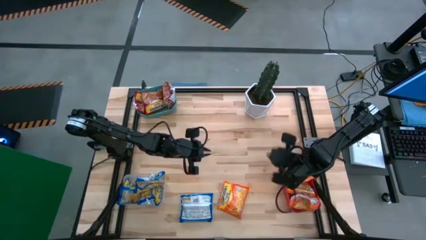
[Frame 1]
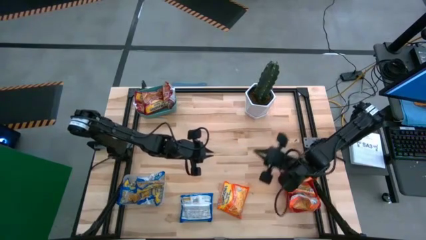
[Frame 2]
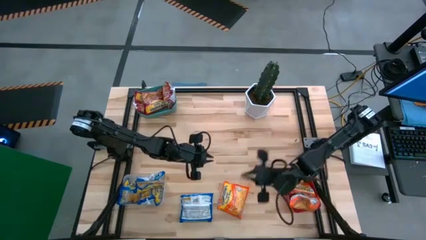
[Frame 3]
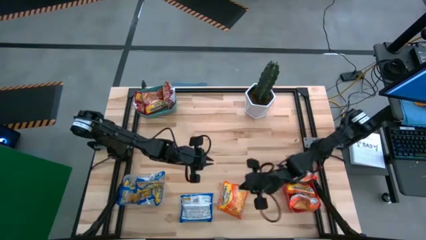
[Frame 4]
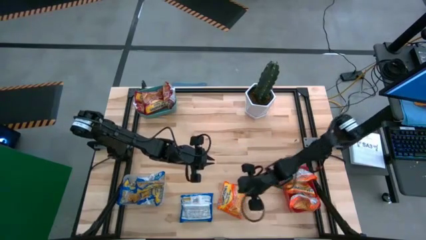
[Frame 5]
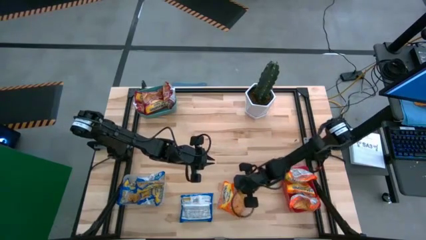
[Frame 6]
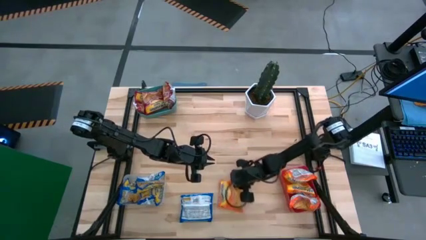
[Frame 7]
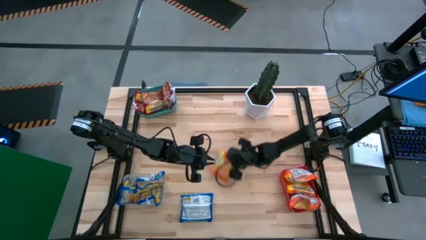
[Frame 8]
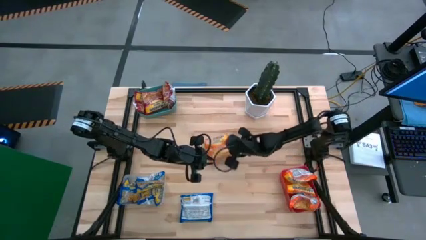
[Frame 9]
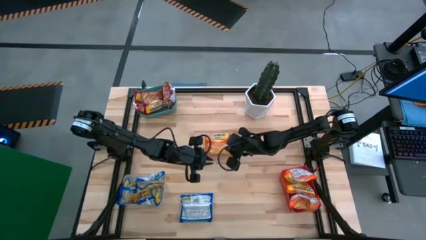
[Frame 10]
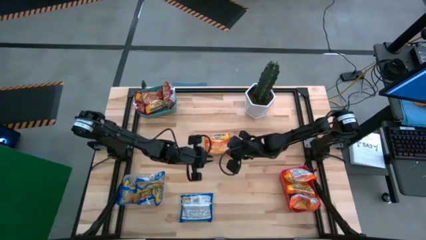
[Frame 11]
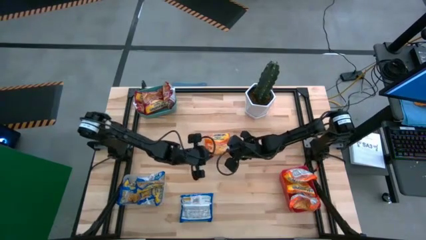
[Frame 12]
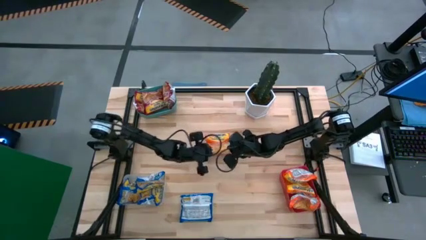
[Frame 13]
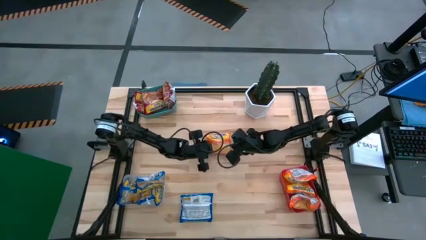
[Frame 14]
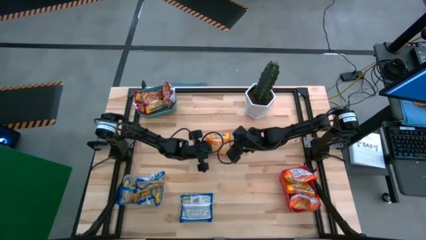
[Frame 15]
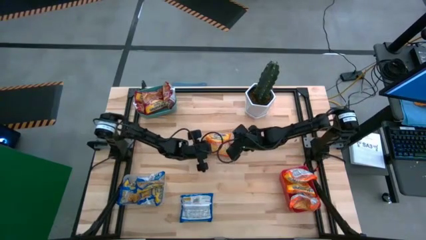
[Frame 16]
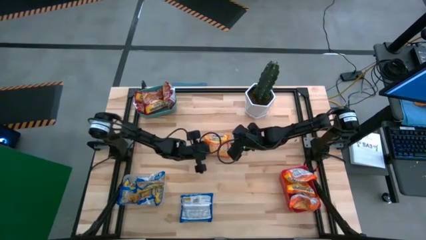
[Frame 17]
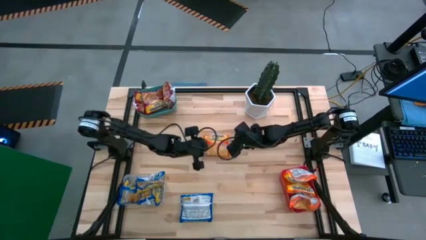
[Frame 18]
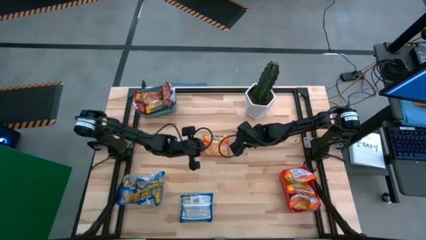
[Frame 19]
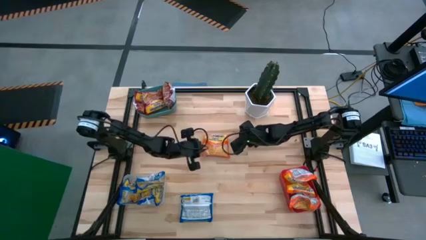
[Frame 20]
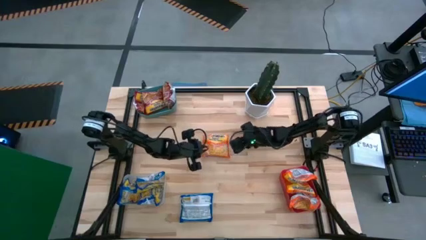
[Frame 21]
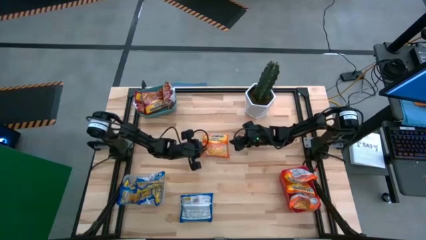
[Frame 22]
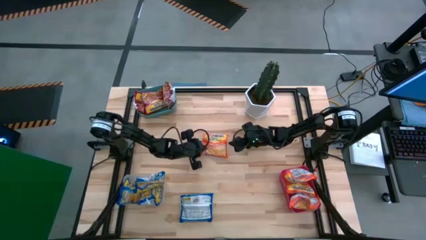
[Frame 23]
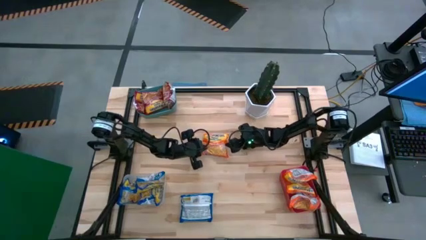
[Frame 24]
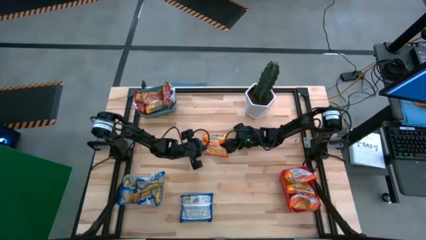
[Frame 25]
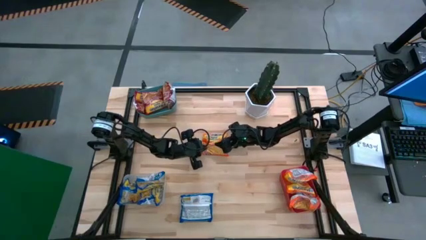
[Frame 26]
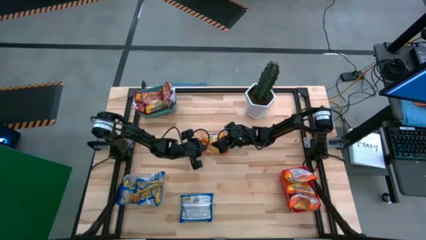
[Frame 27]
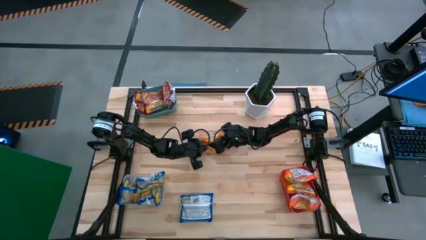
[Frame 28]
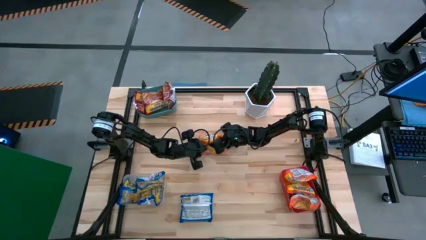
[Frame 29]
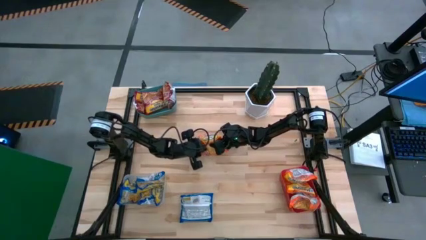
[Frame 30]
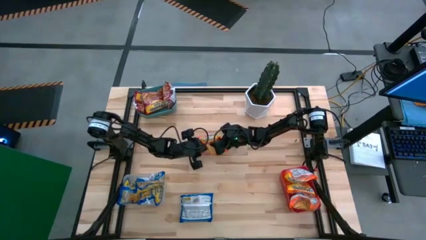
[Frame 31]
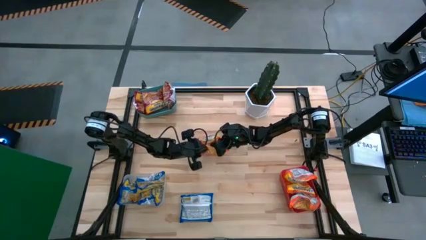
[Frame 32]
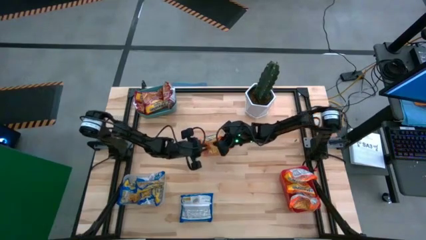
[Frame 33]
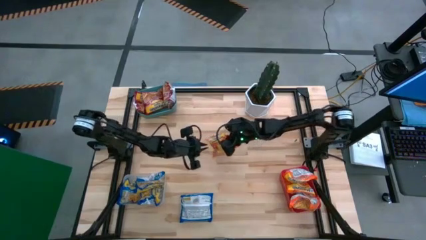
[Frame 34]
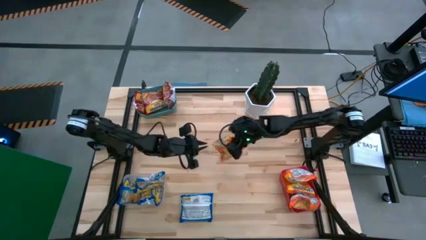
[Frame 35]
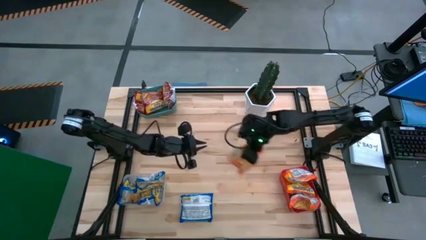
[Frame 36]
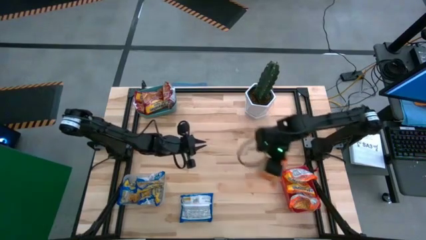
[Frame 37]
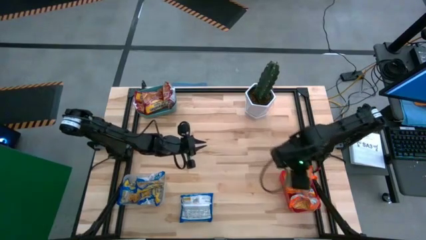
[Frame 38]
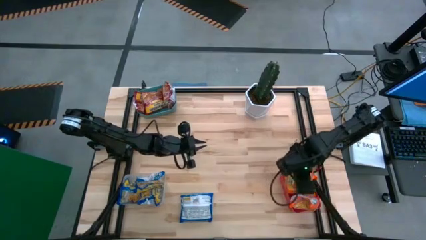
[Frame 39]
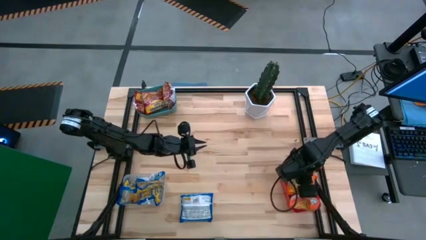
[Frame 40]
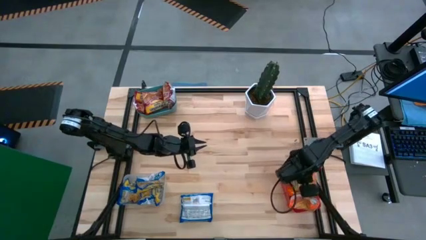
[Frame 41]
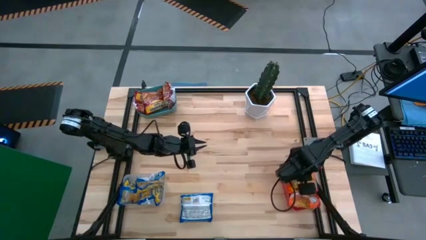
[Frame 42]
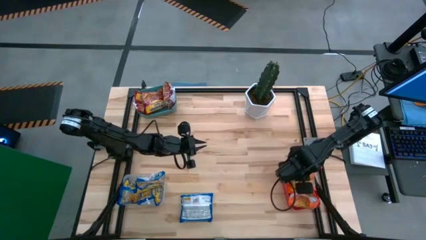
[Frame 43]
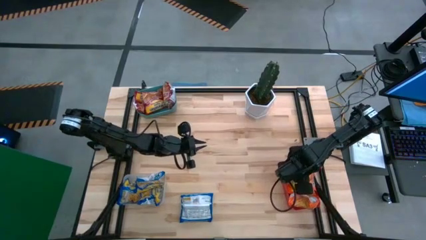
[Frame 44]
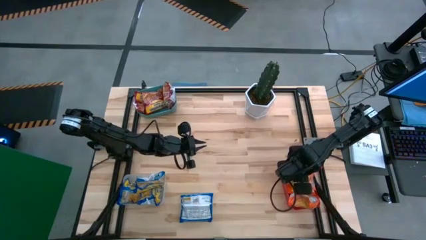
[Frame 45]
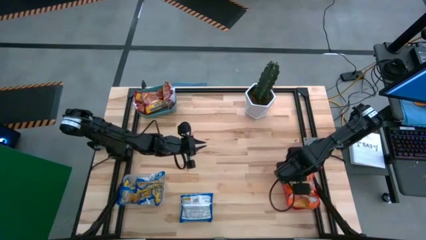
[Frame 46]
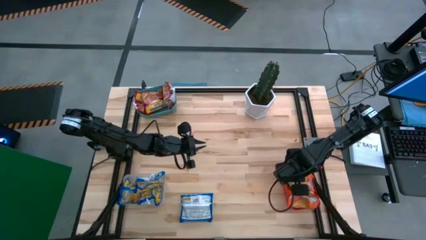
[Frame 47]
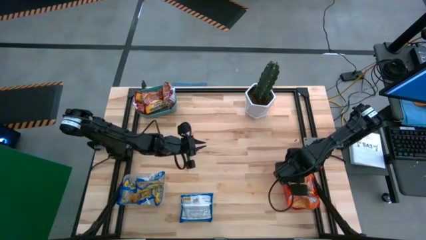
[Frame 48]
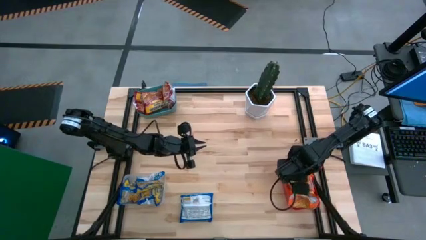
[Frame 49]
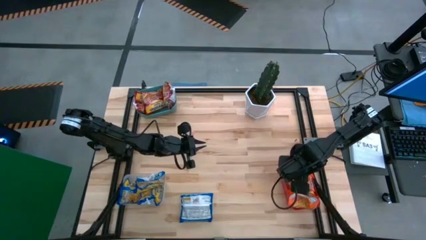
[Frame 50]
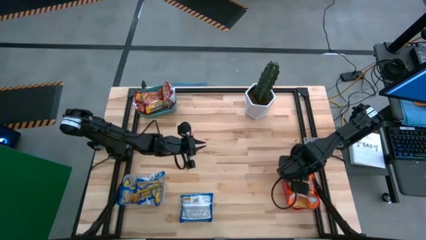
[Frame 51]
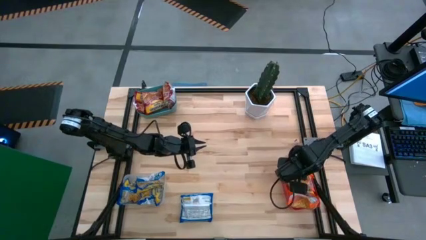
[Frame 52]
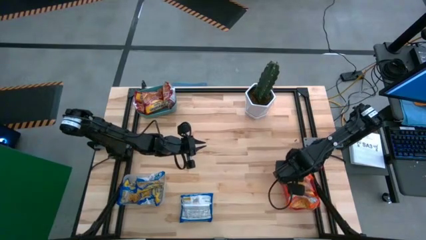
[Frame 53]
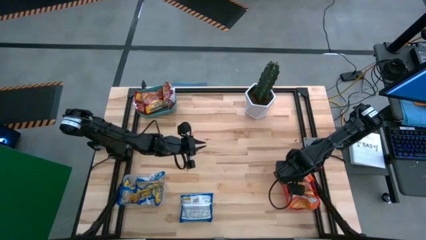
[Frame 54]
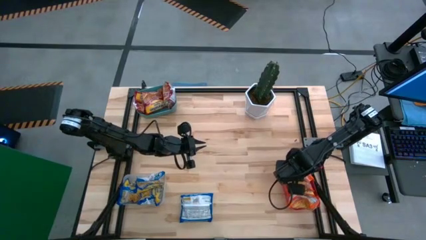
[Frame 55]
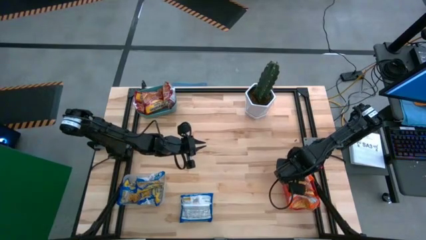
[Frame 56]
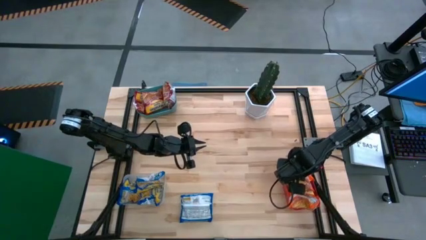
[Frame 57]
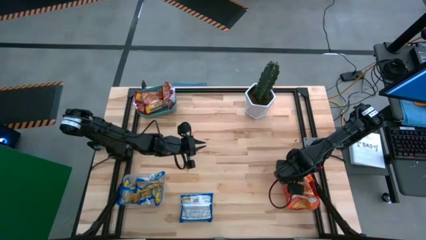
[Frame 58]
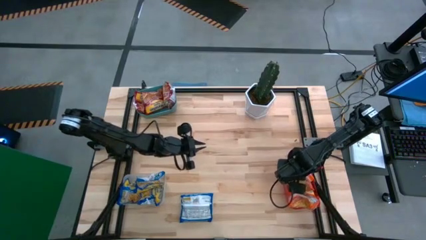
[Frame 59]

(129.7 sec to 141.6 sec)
Task: Sort Maruchan noodles
Put the orange noodle pack into the red bin

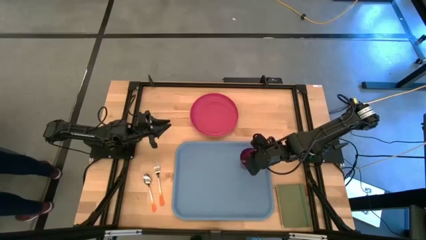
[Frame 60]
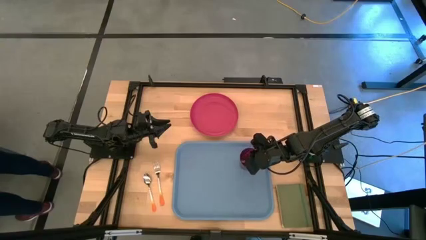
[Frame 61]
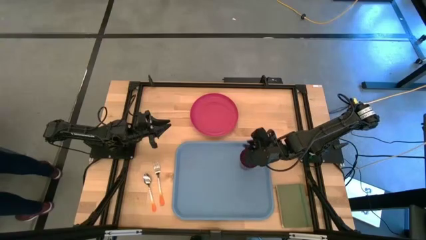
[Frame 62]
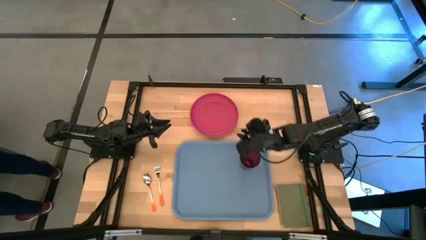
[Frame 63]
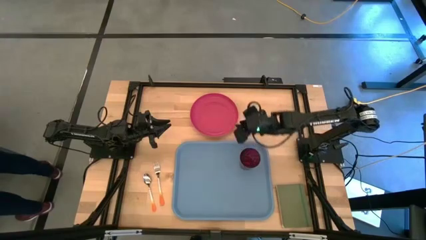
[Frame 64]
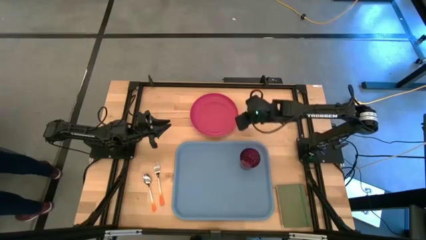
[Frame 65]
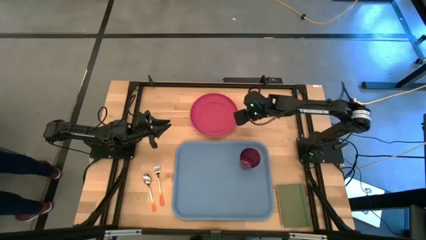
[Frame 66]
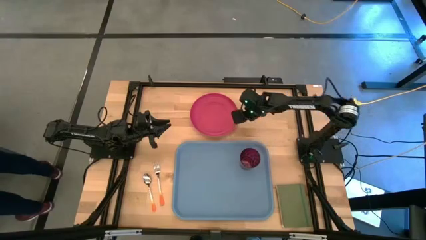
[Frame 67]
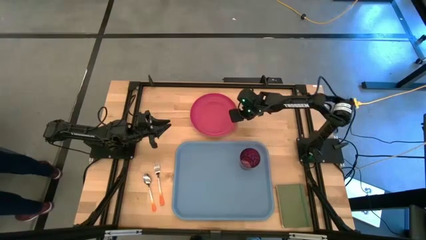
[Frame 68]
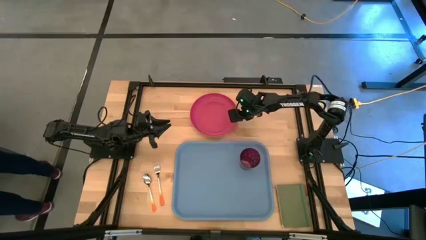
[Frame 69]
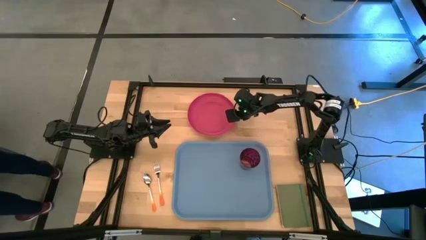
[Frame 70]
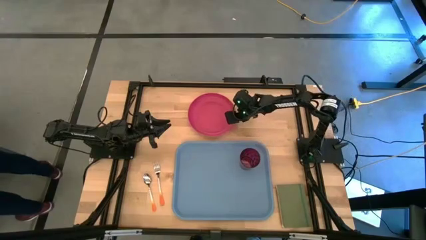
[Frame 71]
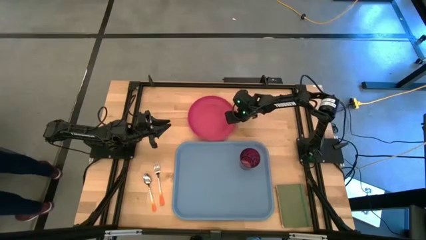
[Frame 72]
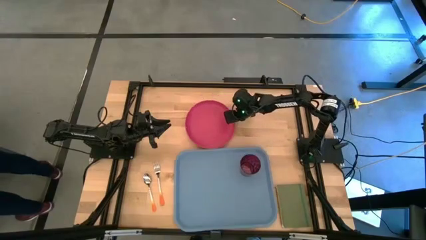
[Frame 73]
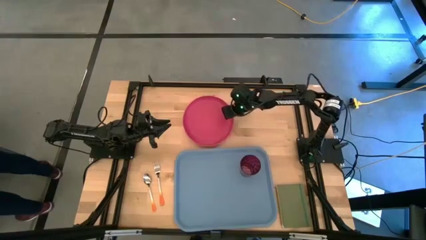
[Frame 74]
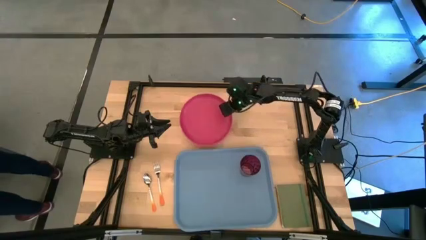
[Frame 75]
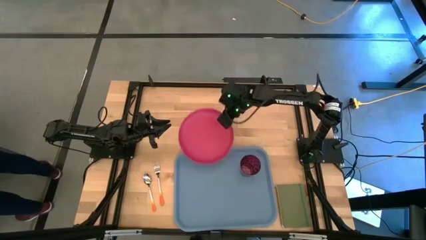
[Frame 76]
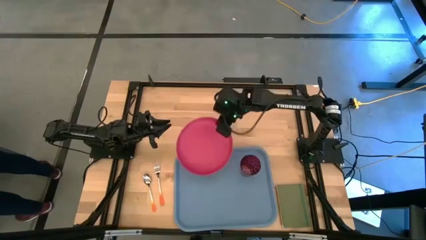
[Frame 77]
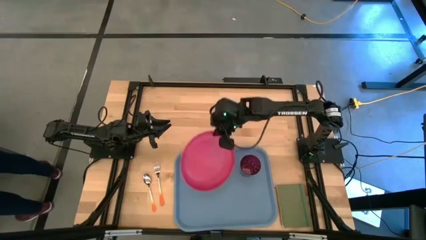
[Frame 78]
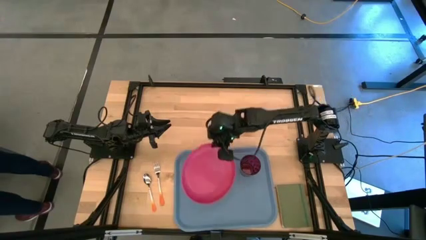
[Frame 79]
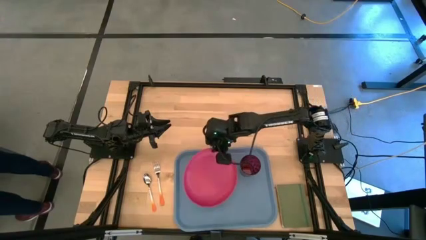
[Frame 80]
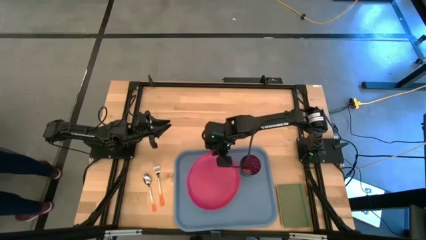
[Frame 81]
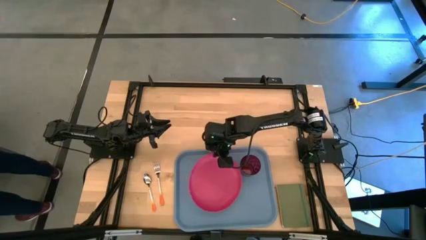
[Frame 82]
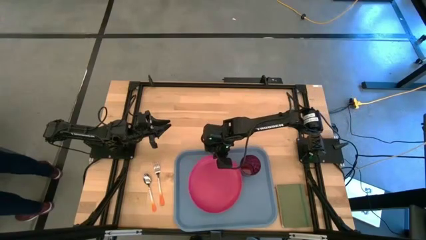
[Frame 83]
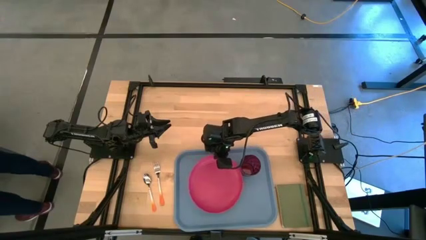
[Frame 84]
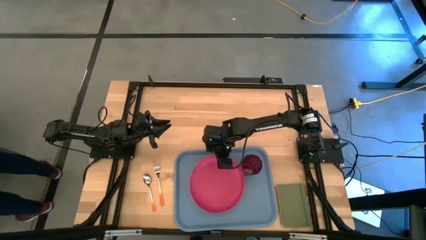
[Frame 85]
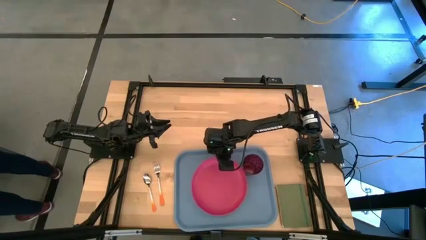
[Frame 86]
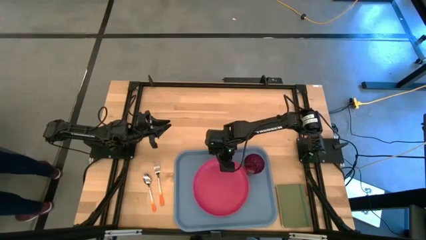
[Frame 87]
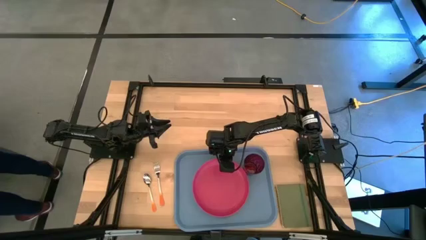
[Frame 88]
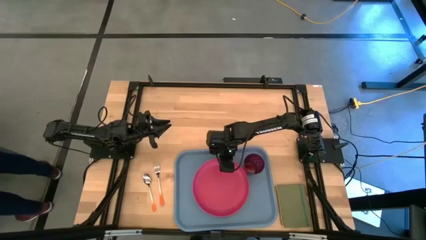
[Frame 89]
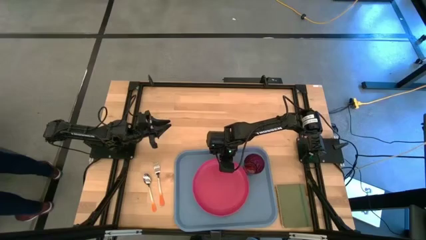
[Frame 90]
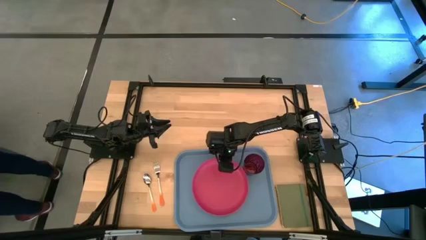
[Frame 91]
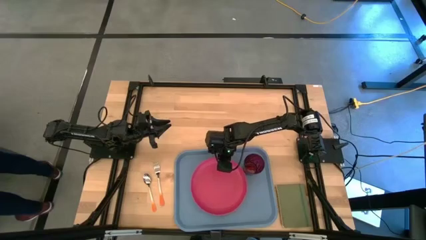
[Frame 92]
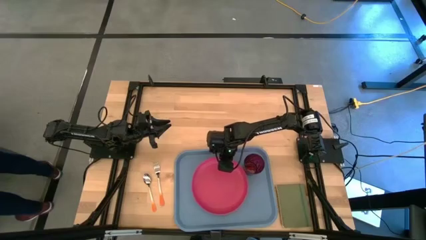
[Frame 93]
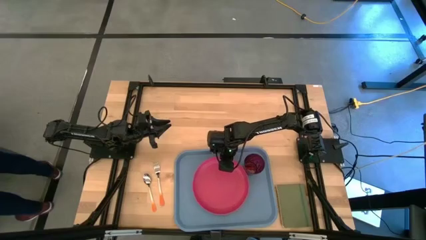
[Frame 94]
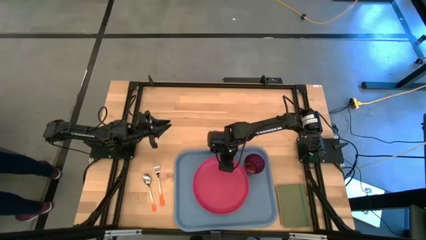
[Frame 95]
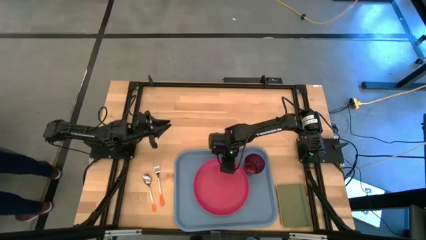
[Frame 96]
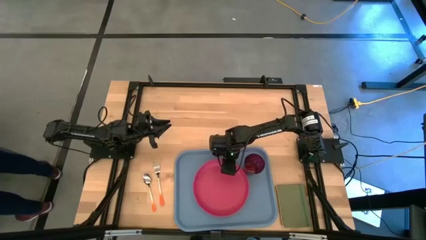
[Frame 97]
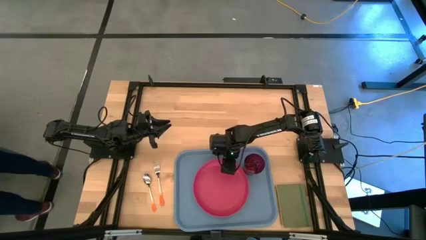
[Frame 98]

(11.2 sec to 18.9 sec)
Task: Pick and place plate/cup/fork/spoon on tray
Put the pink plate on the blue tray
